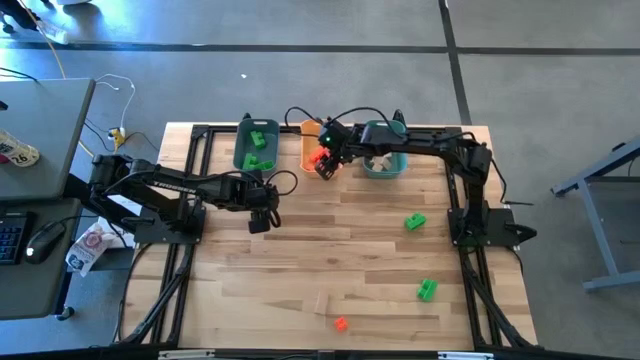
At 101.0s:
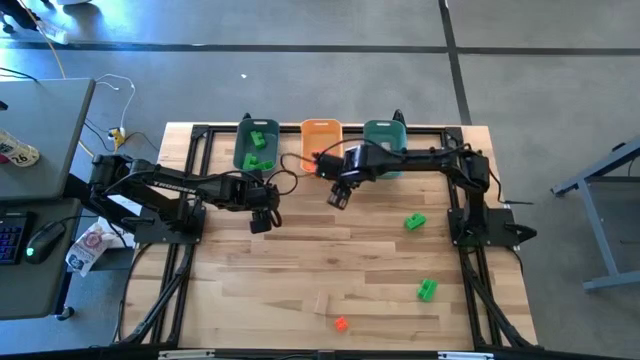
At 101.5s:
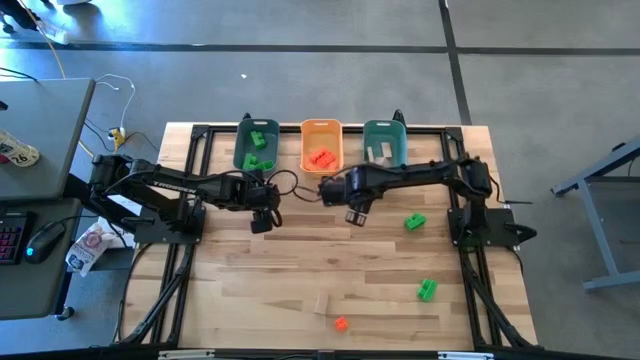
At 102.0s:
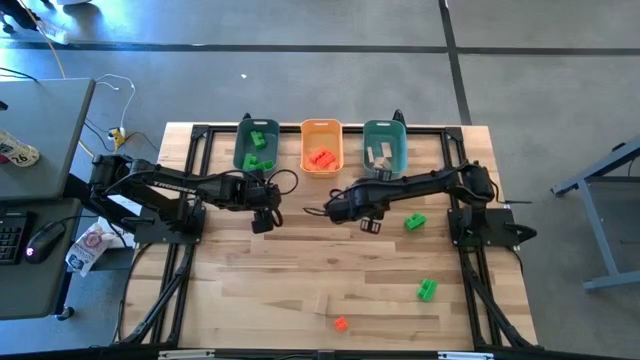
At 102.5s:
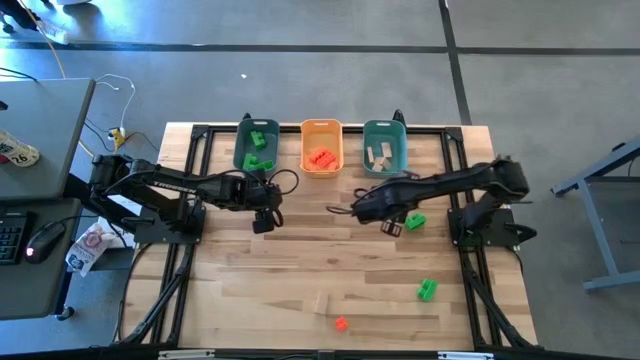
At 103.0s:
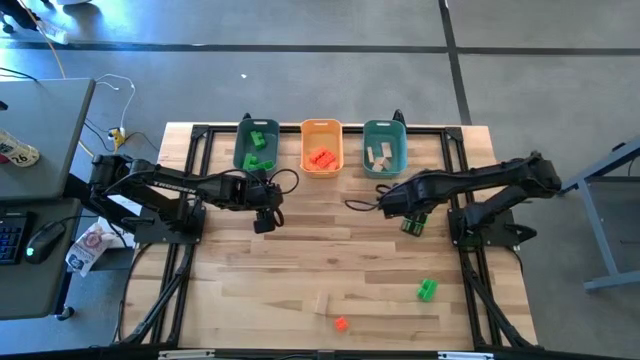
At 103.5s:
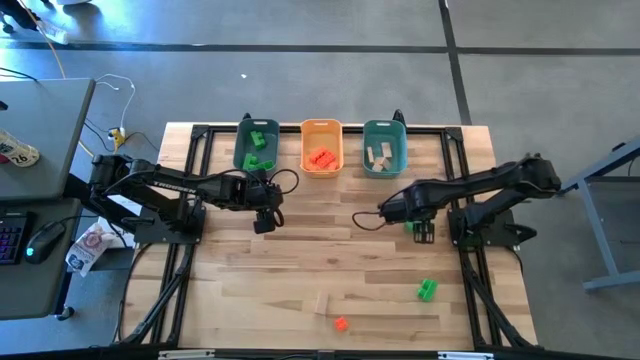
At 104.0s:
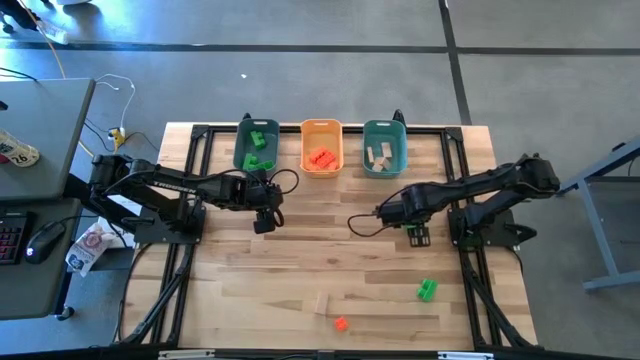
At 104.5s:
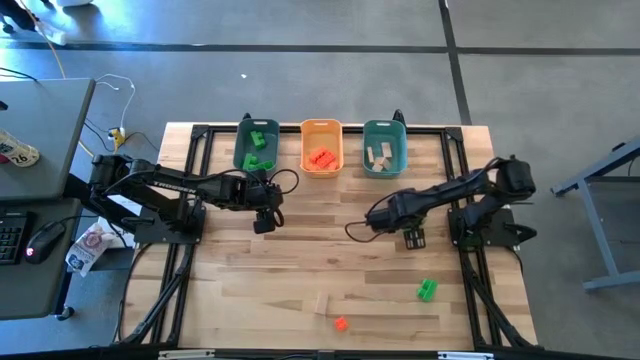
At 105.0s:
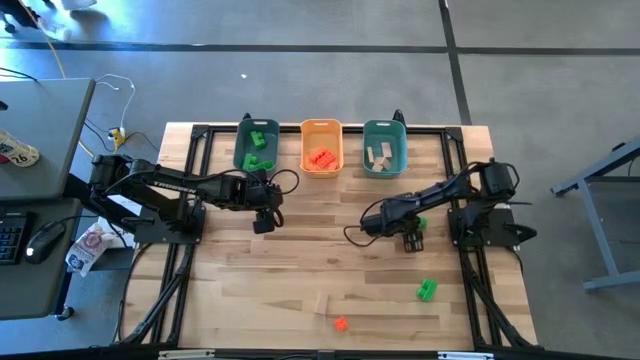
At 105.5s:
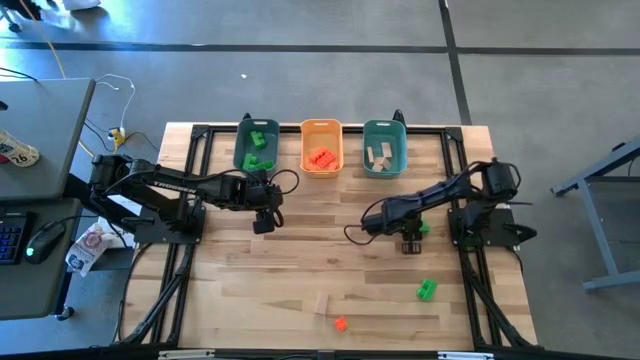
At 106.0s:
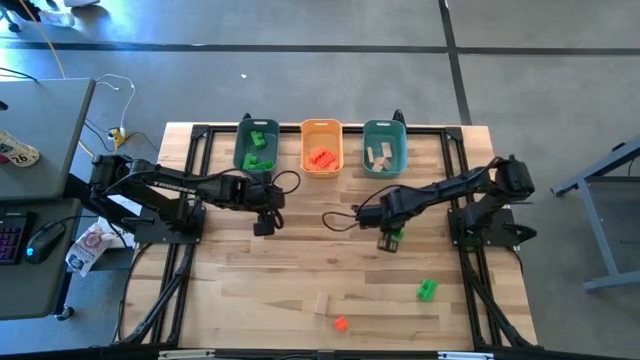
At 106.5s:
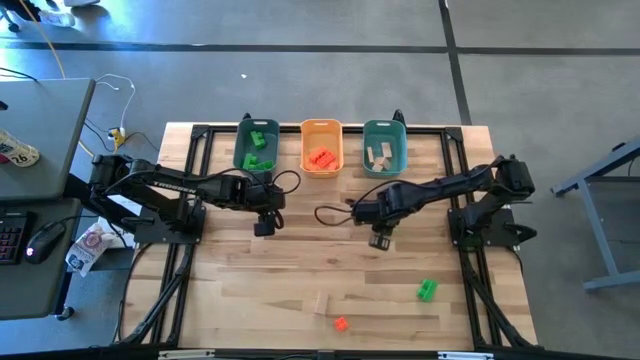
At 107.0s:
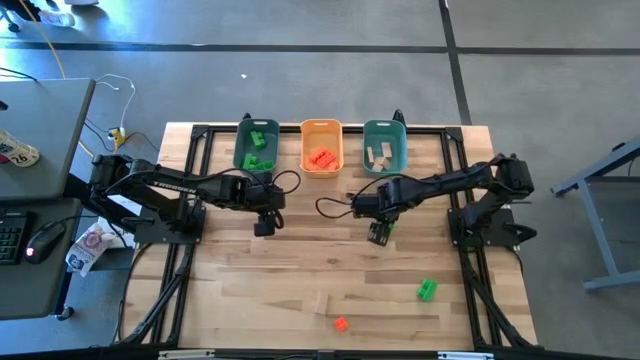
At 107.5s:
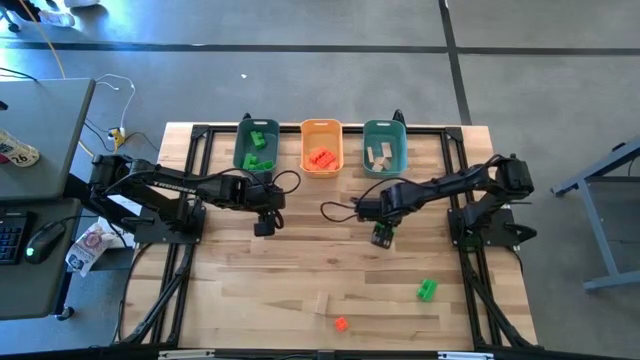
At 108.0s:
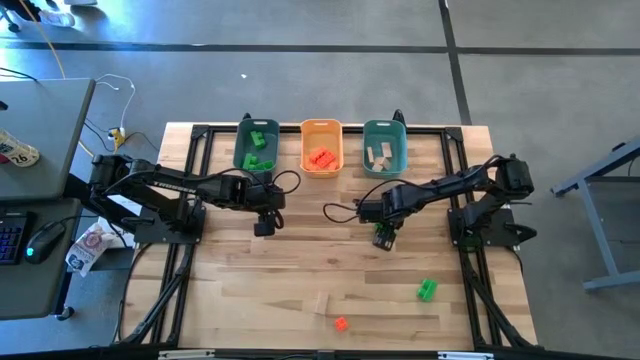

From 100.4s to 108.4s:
Task: Sort & place blocks by color
Put the green game piece into the dark blue bin

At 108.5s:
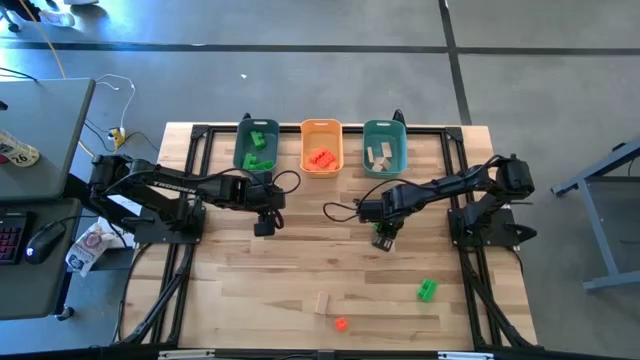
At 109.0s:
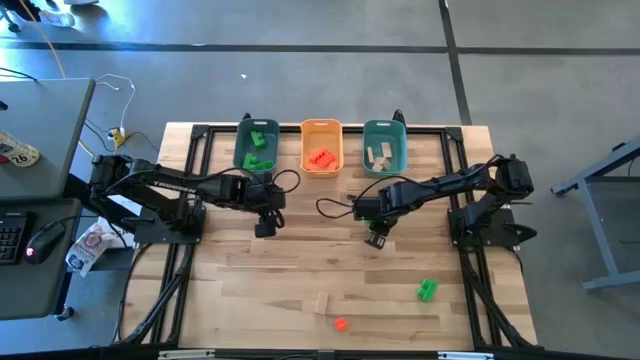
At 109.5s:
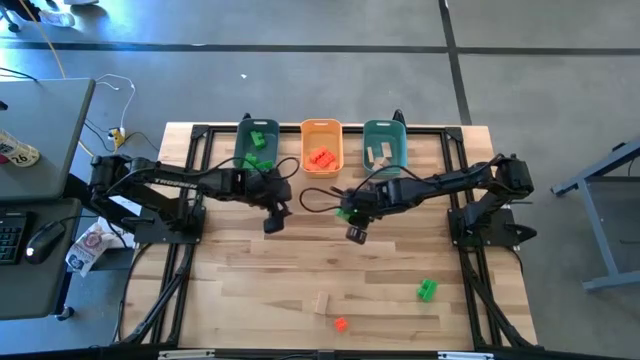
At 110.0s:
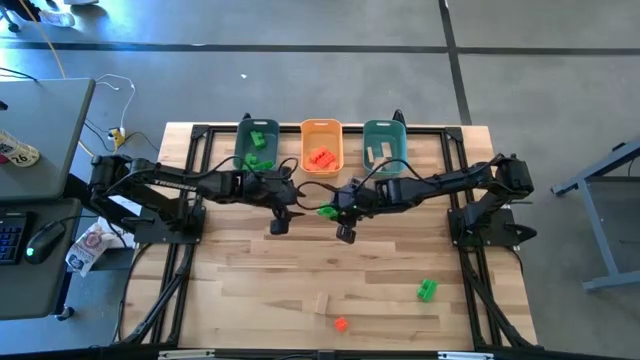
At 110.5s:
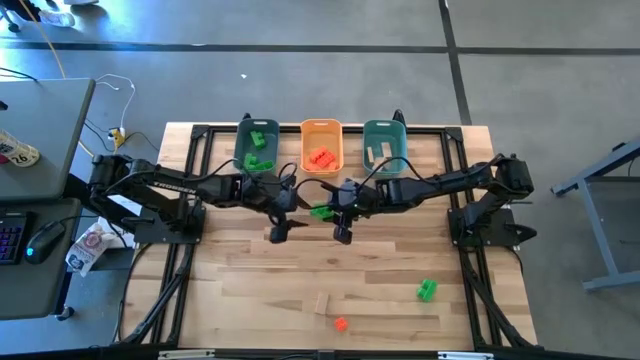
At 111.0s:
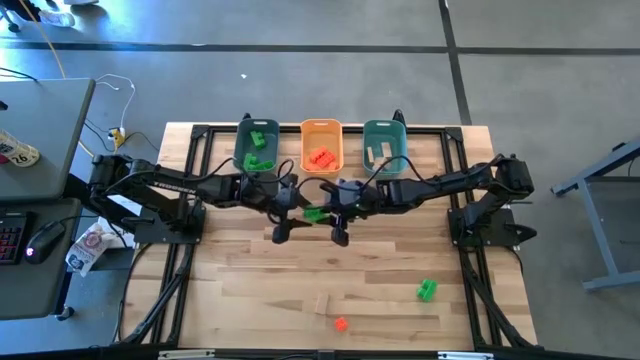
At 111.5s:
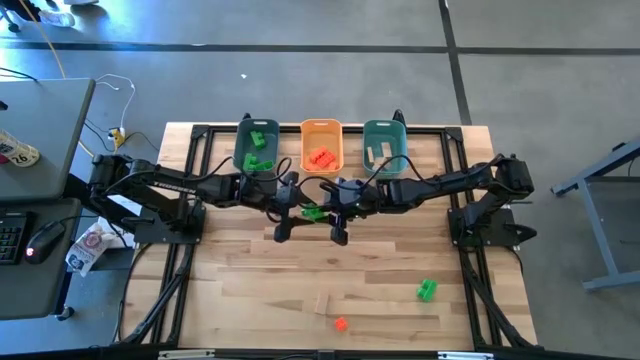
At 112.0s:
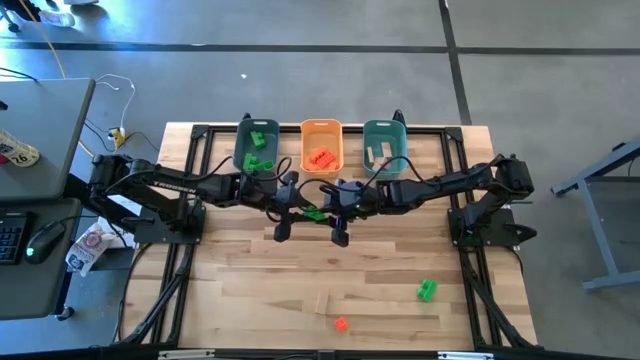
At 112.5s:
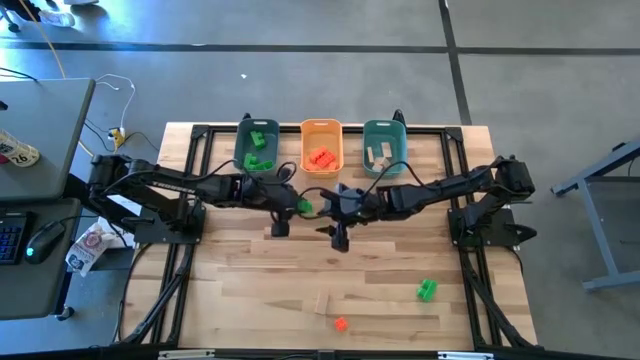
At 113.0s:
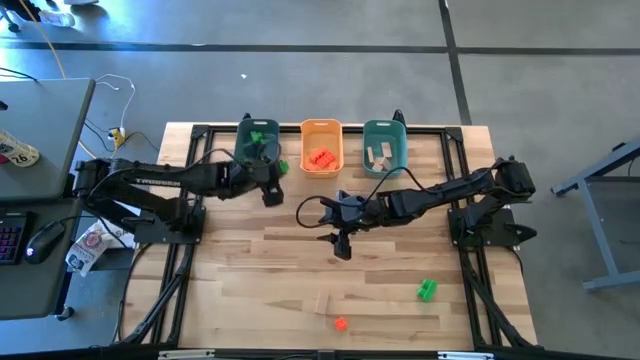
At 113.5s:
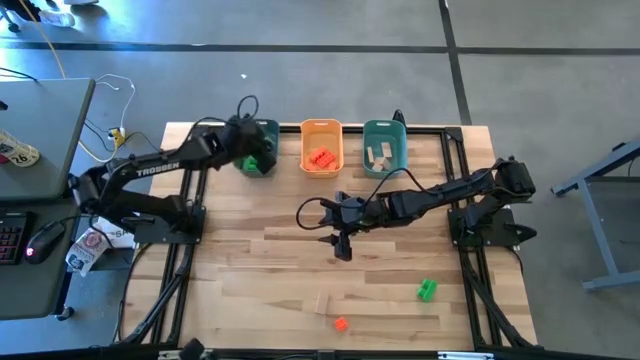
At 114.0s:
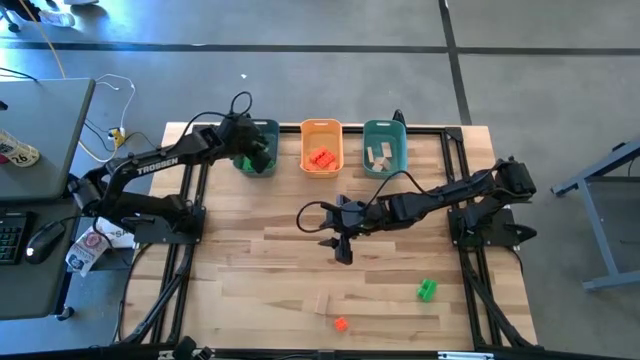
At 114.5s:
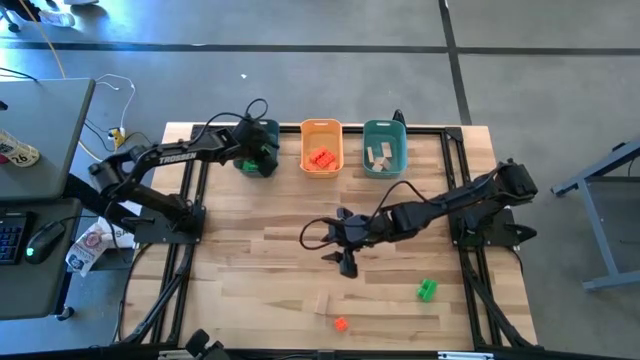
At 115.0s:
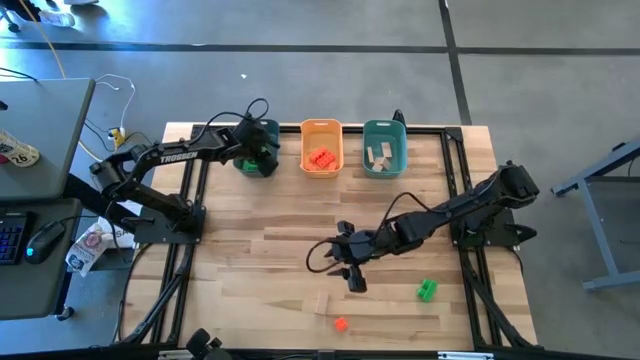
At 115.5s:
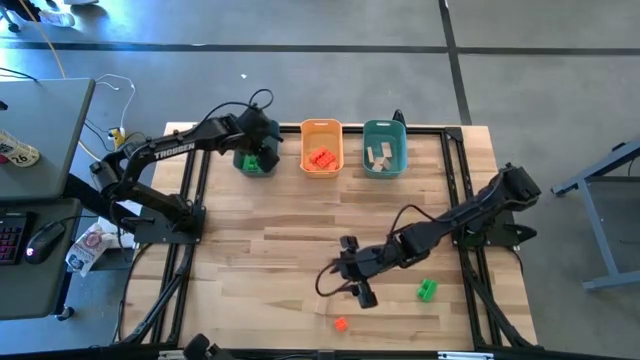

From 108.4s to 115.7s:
Put the green game piece into the dark blue bin

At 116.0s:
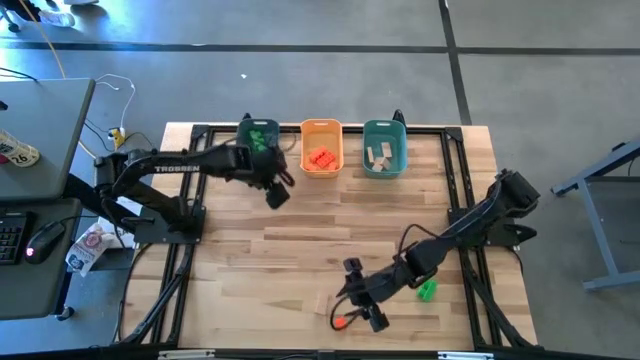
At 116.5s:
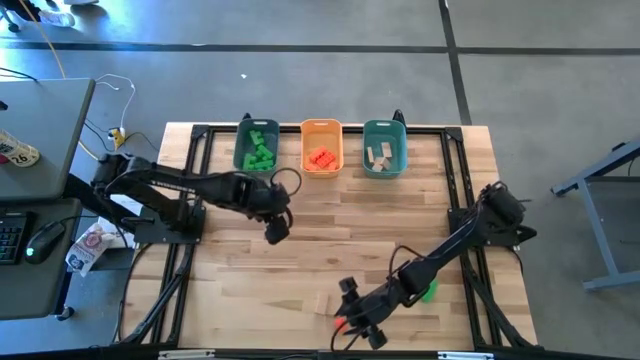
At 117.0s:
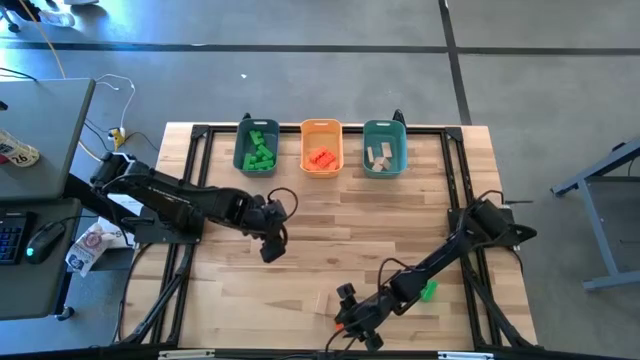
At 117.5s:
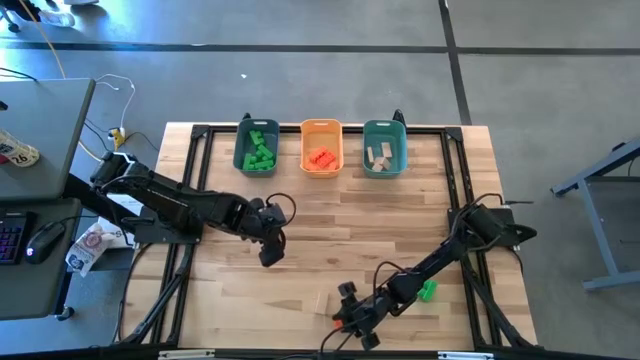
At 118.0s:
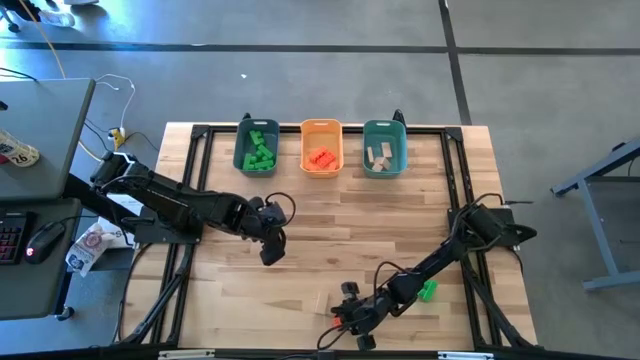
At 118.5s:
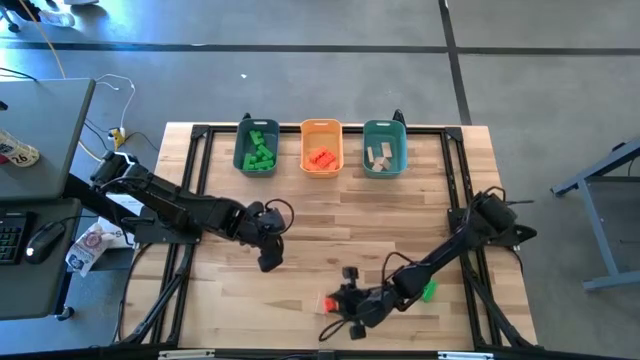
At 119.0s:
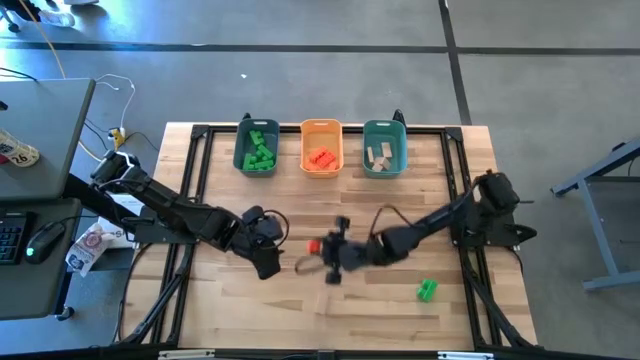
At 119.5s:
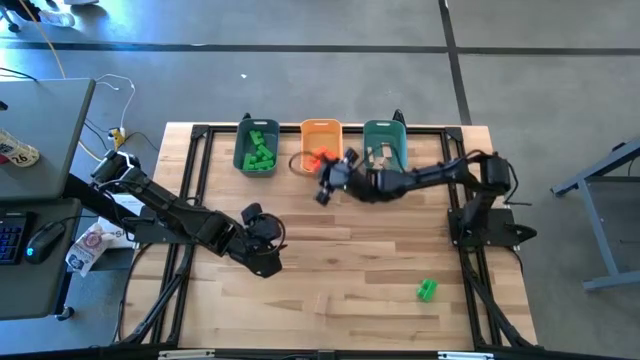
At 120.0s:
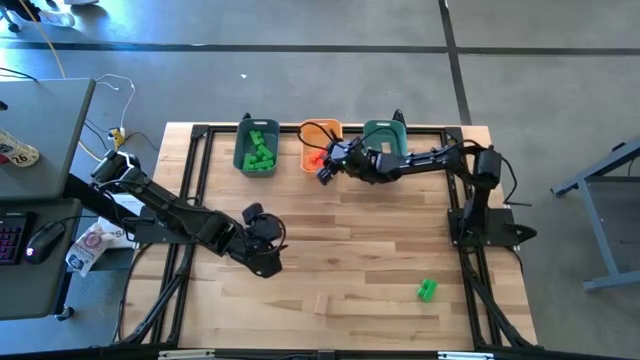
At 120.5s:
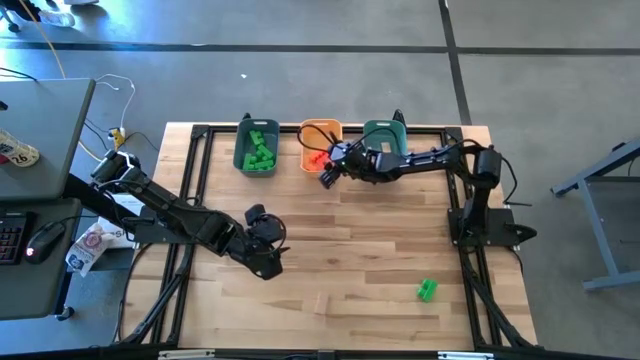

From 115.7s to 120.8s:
Put the orange game piece into the yellow bin

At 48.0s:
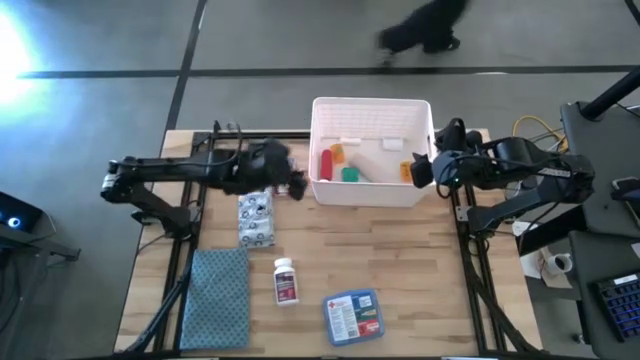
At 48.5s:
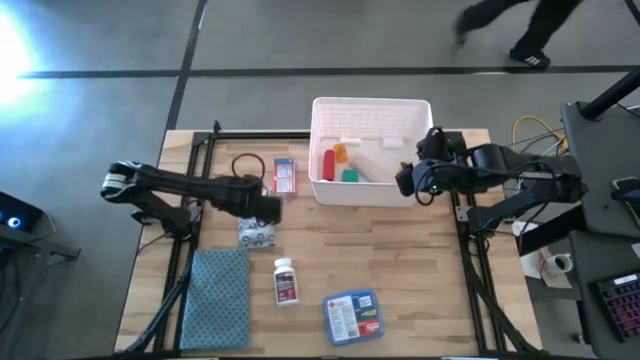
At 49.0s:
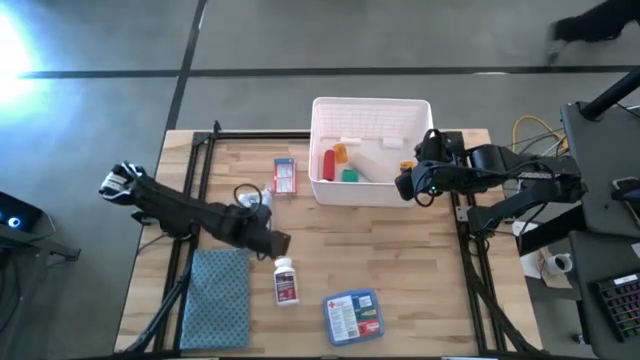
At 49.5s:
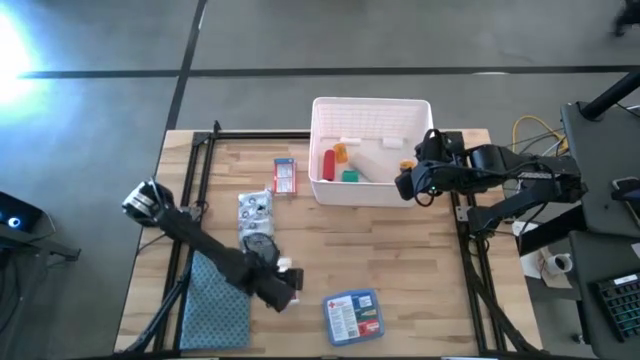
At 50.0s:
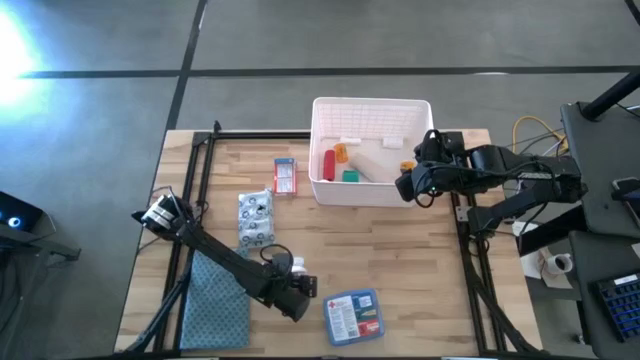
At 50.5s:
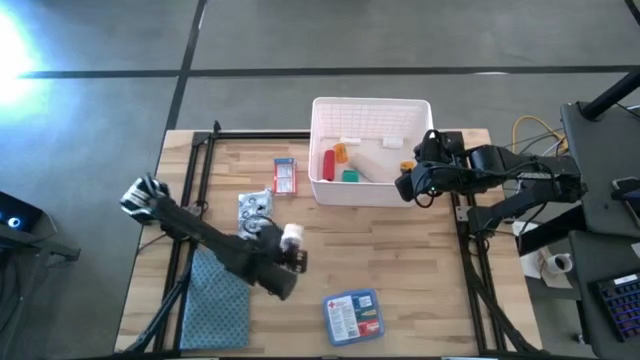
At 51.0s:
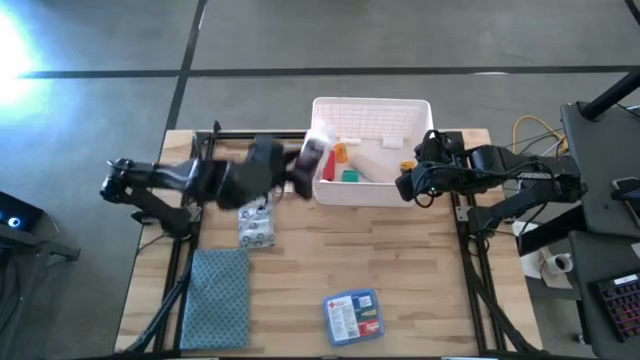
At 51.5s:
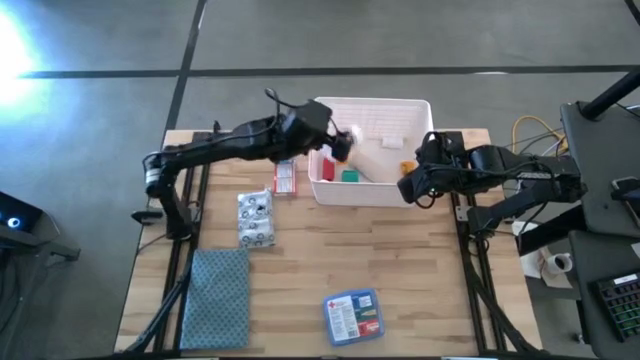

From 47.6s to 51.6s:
Task: Pick & place medical supplies in basket/bin
Put the white medicine bottle into the bin
